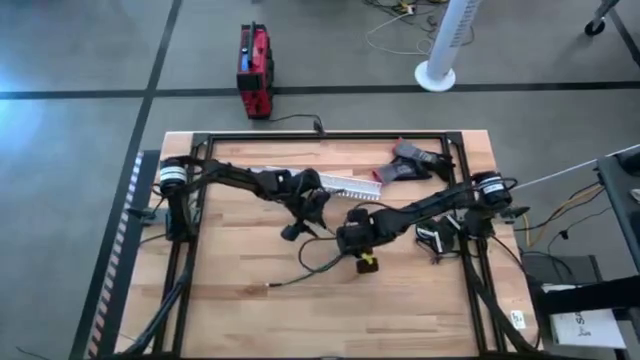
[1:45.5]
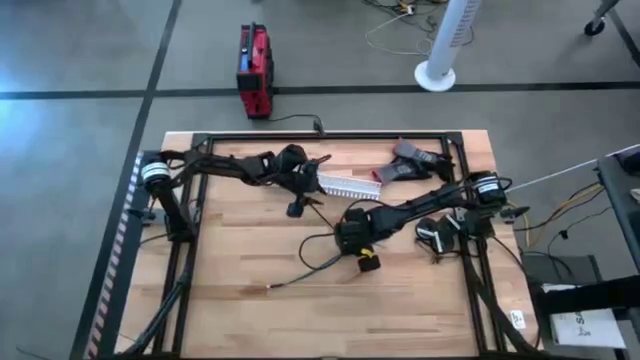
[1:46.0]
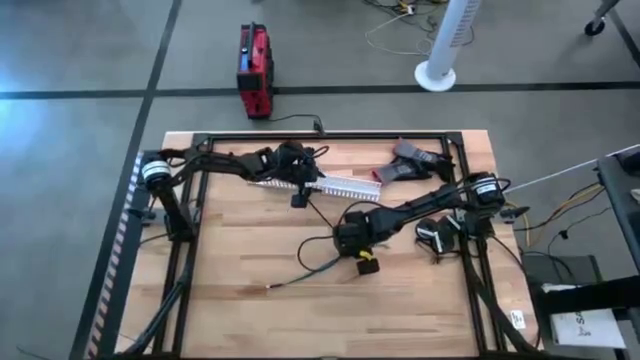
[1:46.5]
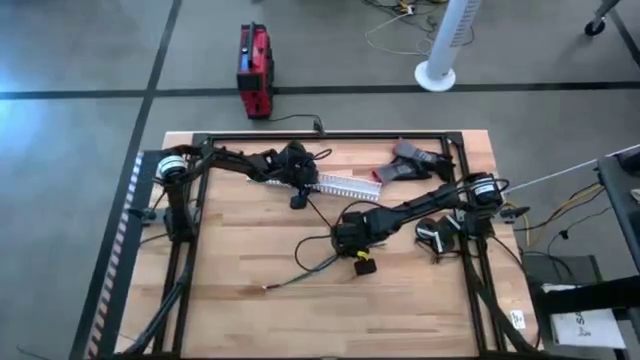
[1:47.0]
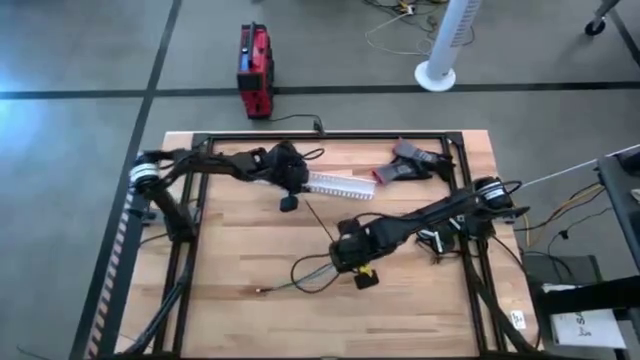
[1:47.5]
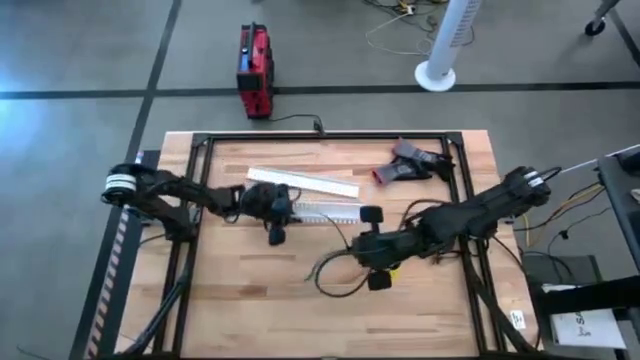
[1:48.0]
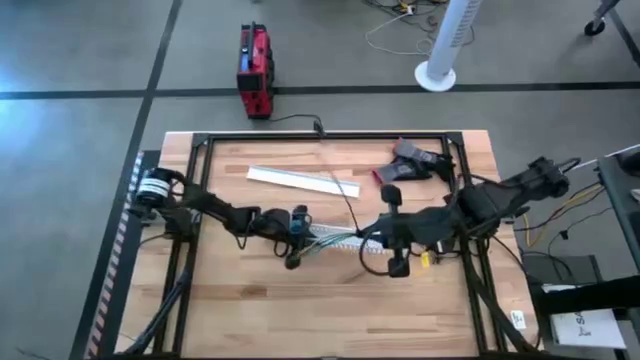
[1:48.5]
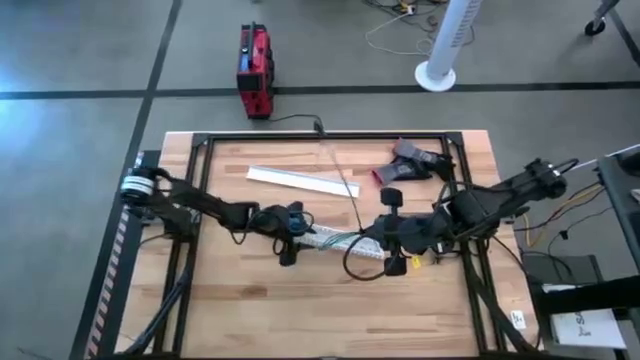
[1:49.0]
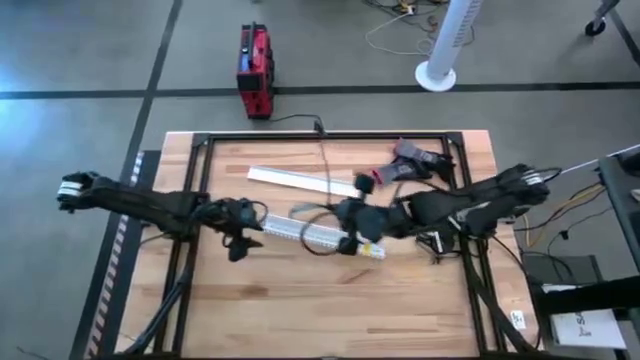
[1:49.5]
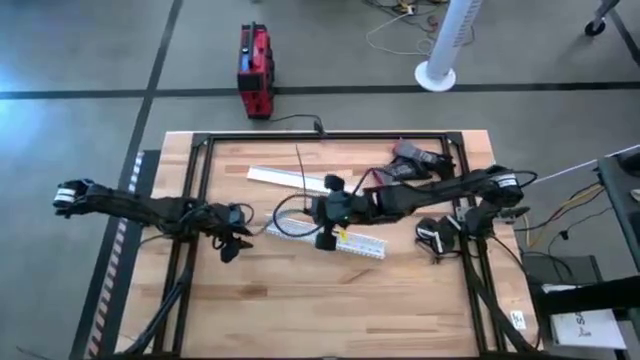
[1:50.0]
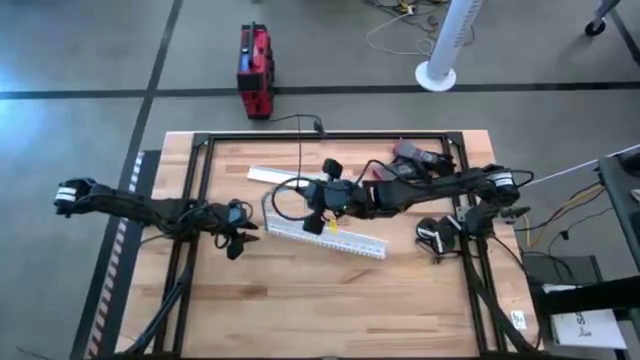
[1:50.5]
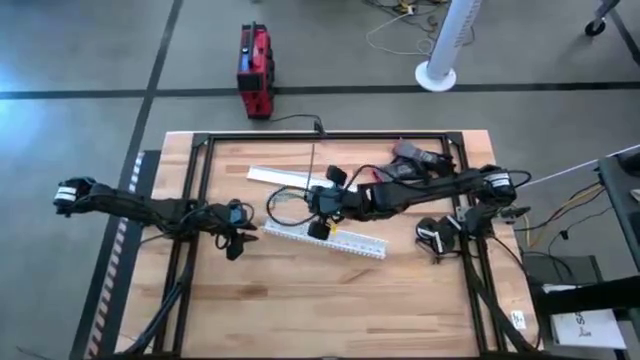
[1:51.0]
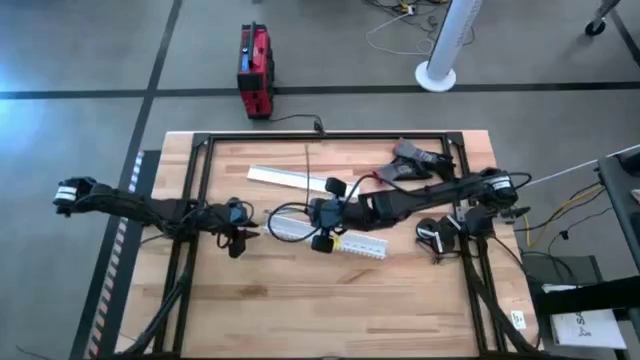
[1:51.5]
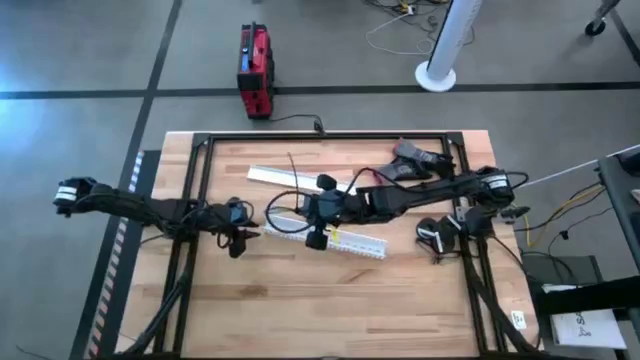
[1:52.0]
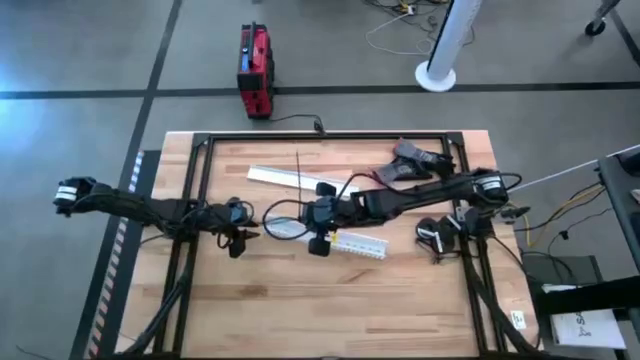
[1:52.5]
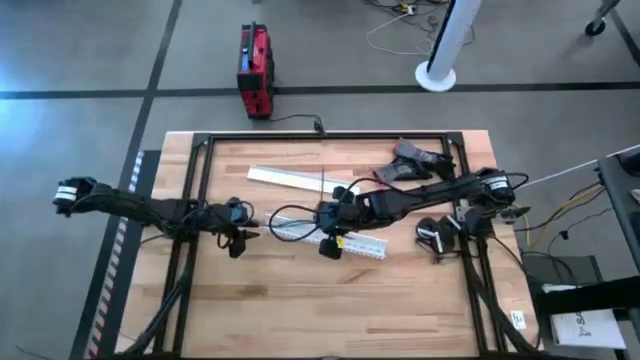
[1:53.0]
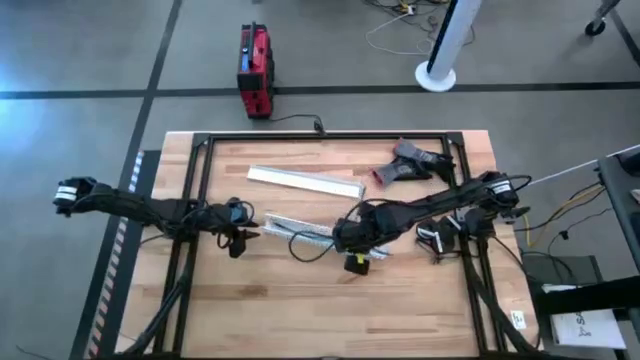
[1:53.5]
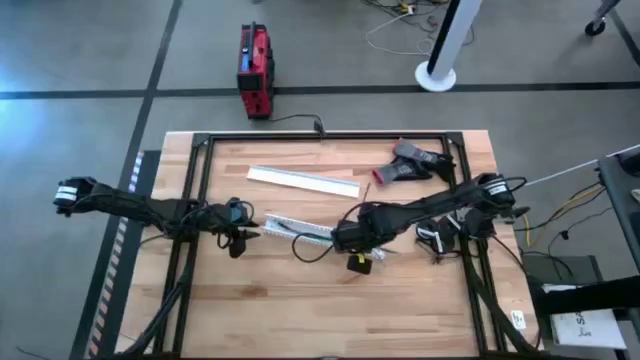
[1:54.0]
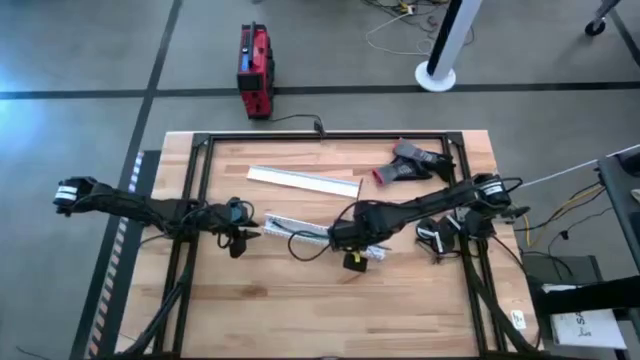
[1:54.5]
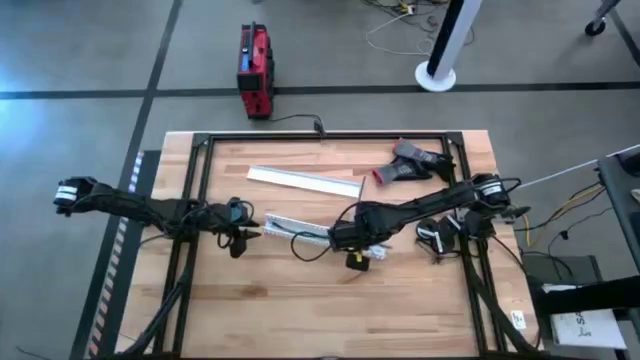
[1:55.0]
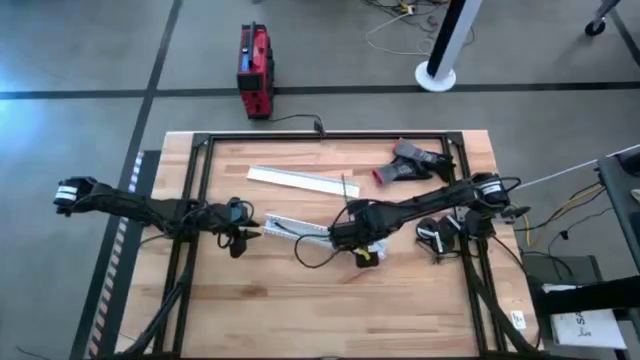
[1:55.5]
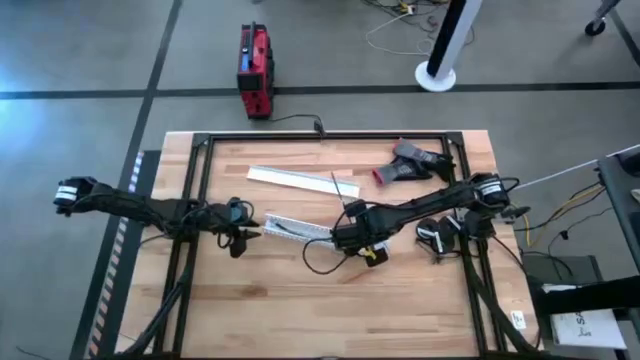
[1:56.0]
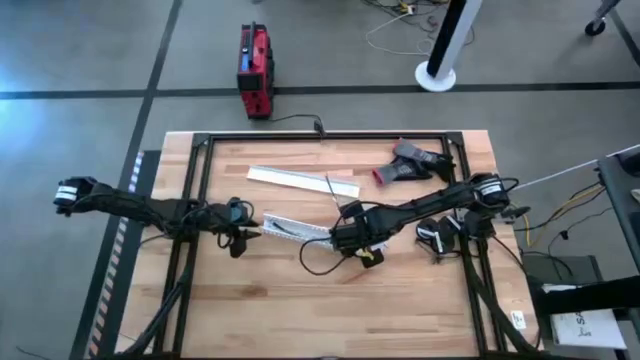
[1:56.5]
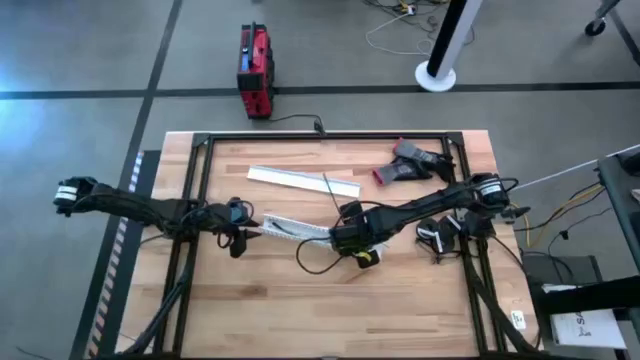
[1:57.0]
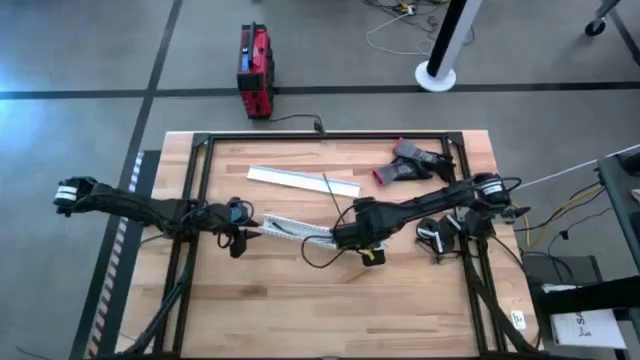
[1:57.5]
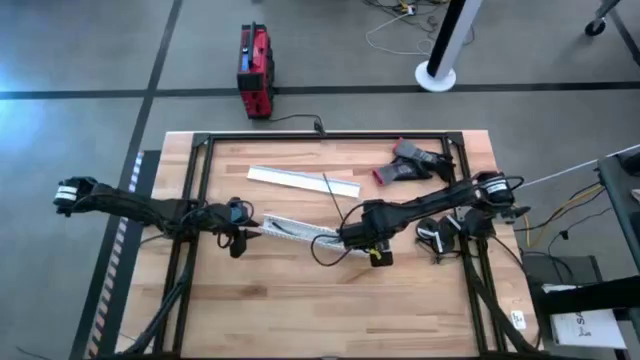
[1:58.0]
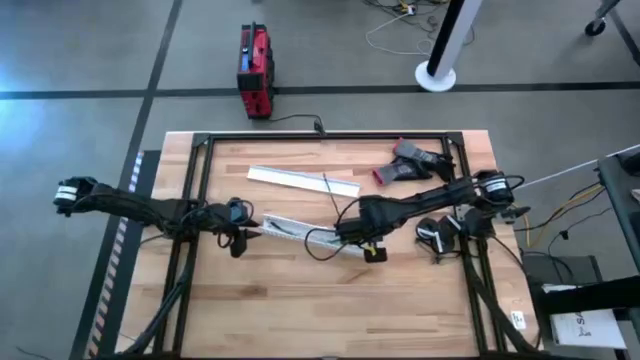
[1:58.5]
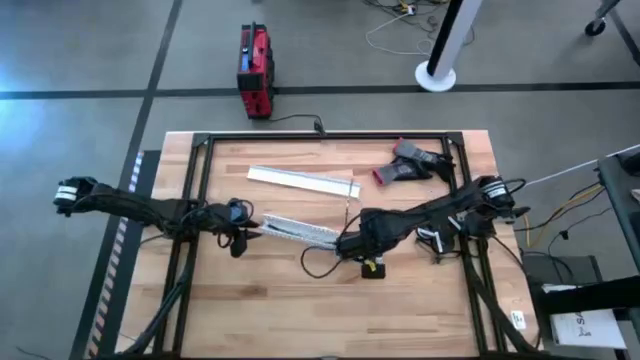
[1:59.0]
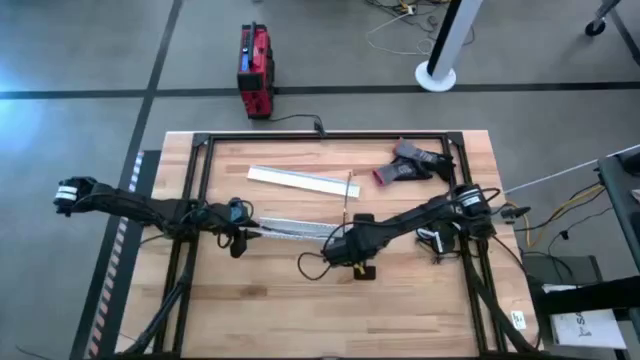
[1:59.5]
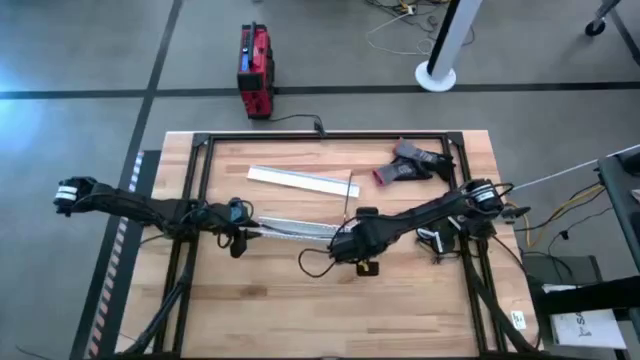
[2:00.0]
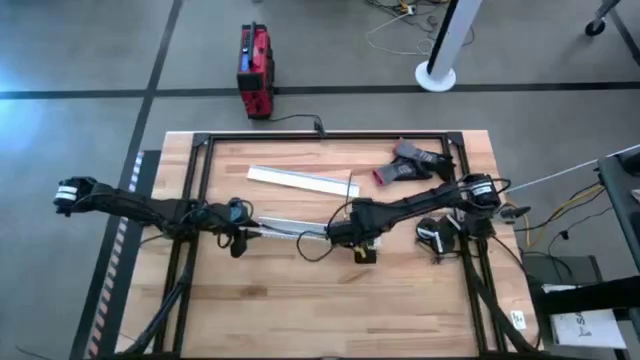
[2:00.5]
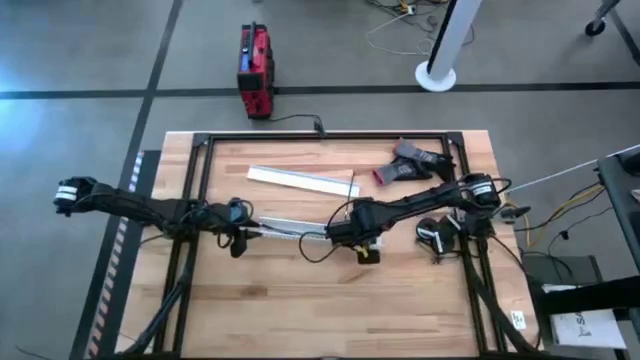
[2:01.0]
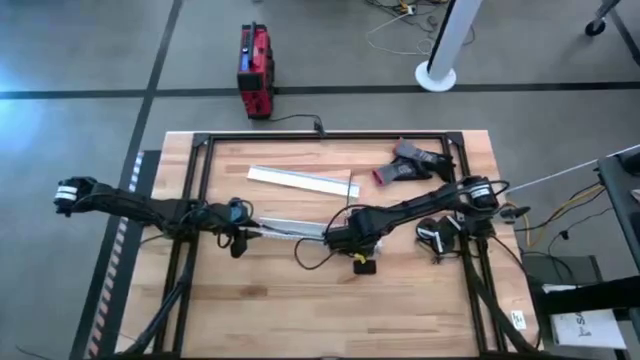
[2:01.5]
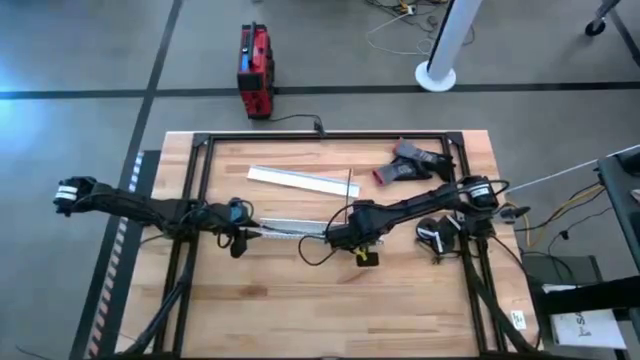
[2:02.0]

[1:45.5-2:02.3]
Task: Ziptie cables
Put the cable wires with a zip tie into the white cable duct

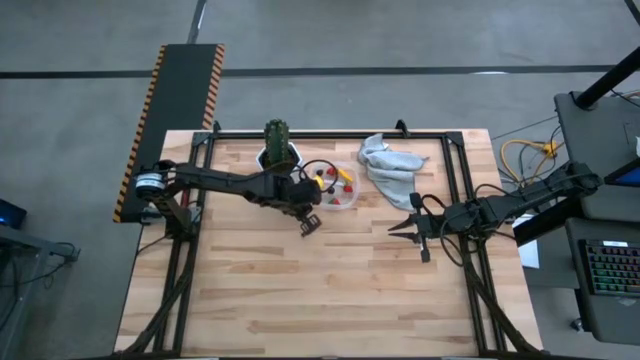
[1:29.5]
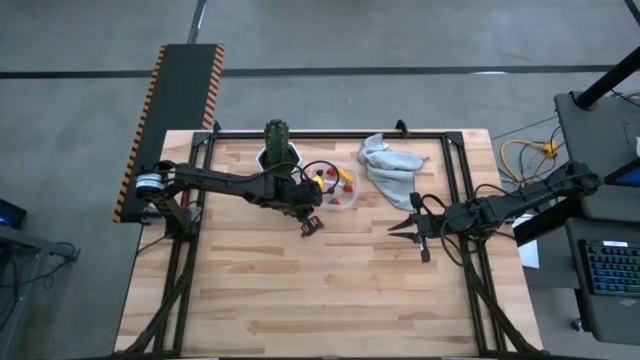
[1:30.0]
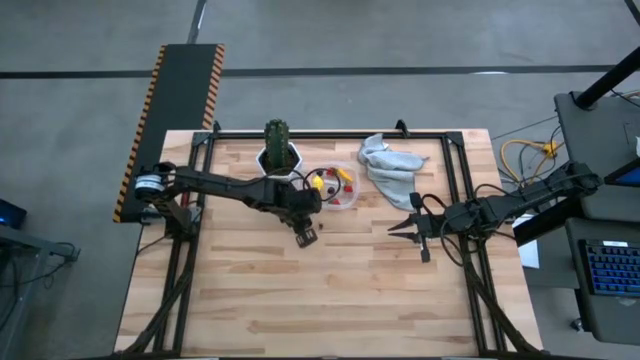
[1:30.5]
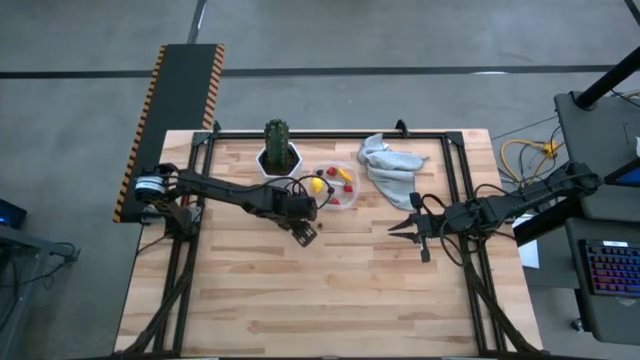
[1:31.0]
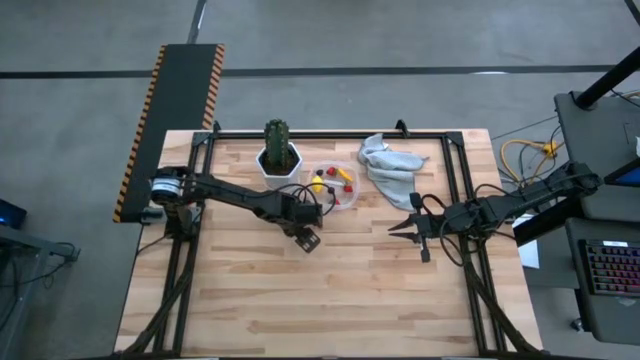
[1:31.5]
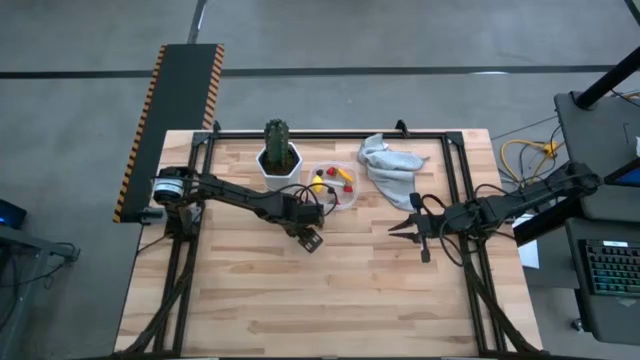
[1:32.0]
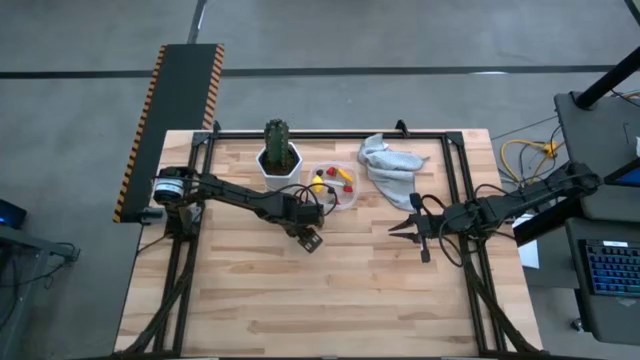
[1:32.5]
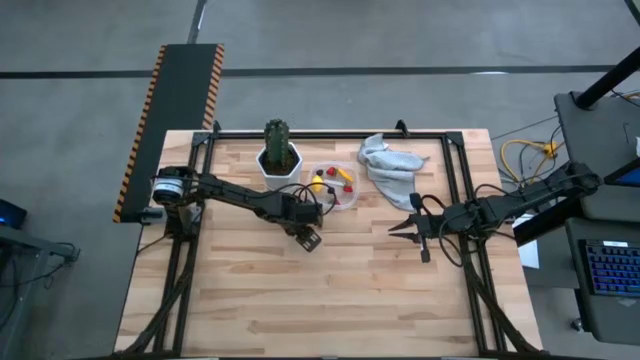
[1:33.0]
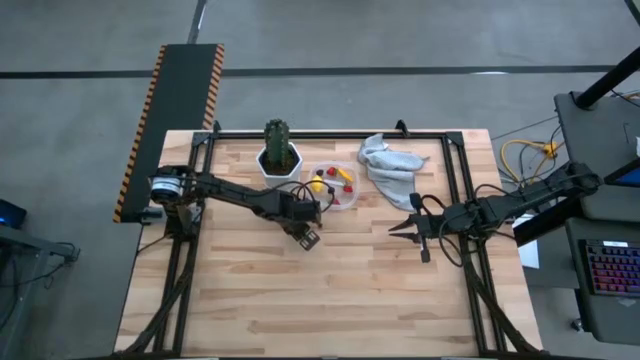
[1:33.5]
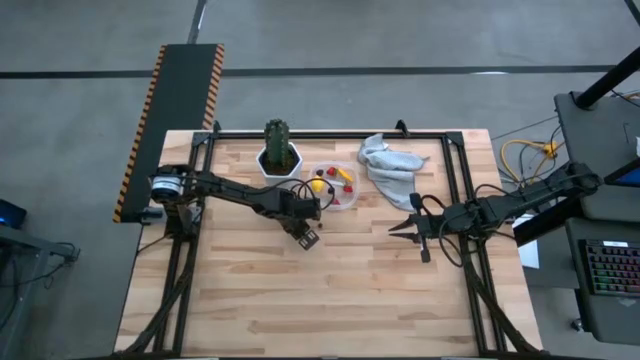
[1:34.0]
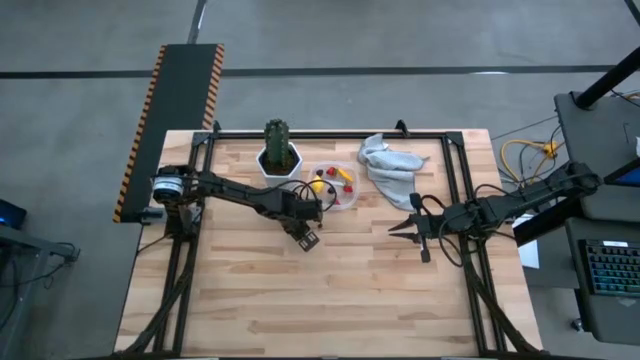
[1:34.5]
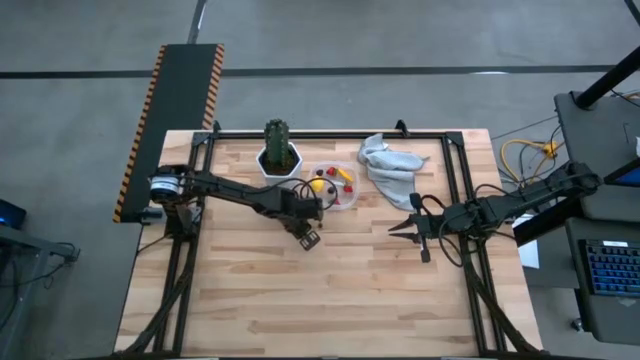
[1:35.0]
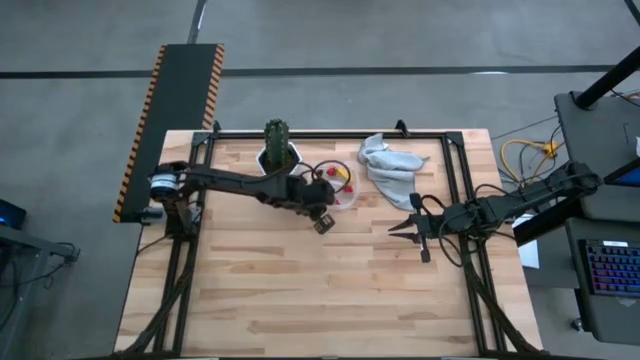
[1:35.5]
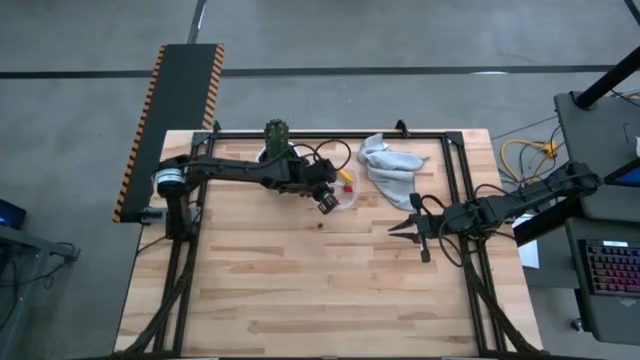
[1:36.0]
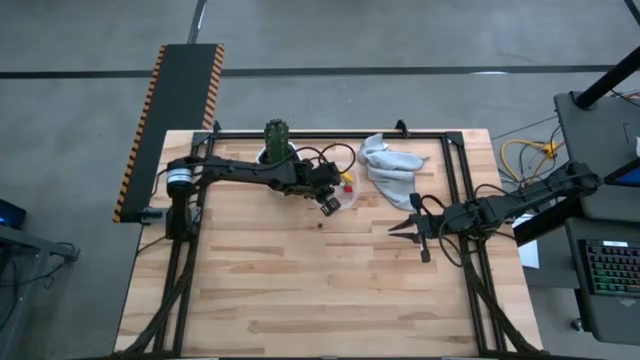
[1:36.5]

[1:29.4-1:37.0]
Task: Pick and placing Produce into tupperware
Put the bottom blueberry into the transparent bin
